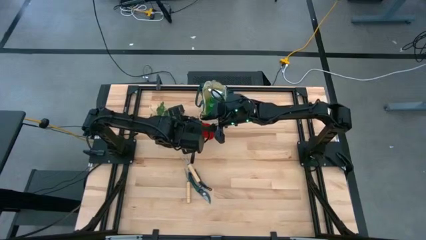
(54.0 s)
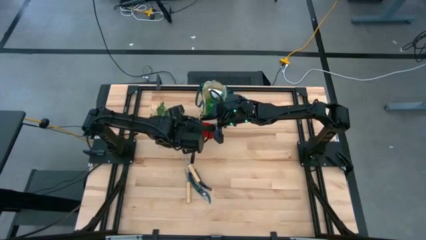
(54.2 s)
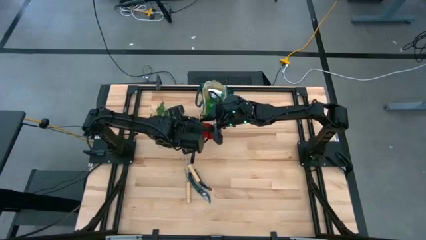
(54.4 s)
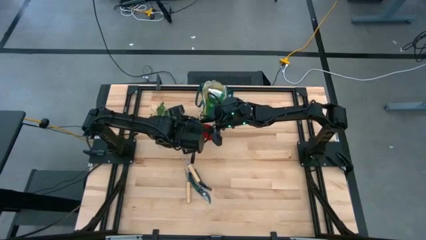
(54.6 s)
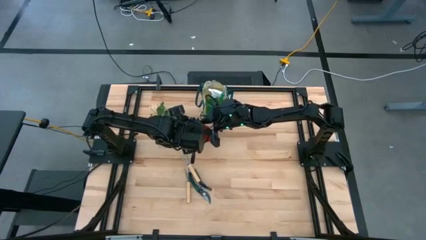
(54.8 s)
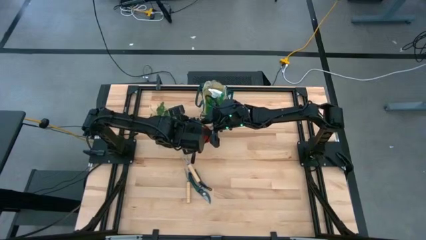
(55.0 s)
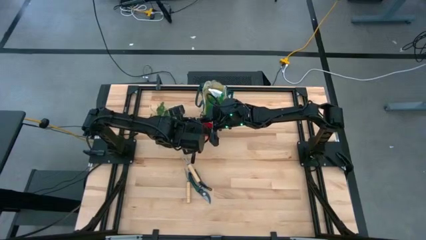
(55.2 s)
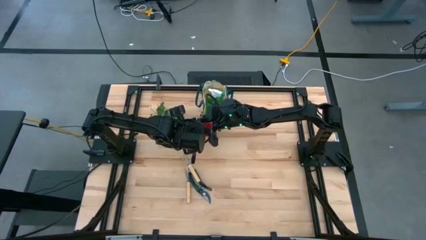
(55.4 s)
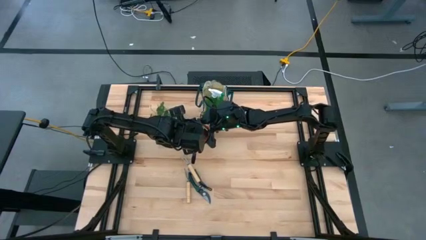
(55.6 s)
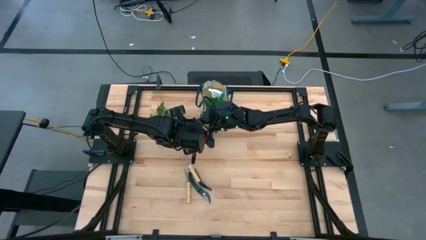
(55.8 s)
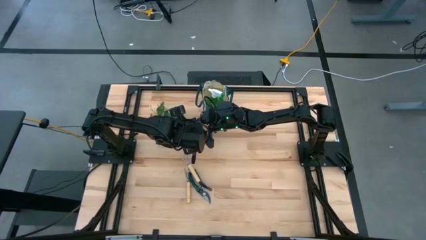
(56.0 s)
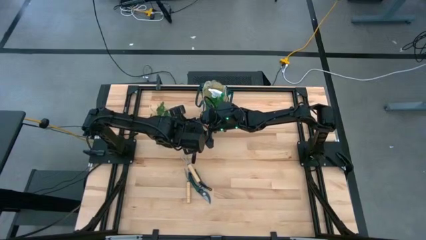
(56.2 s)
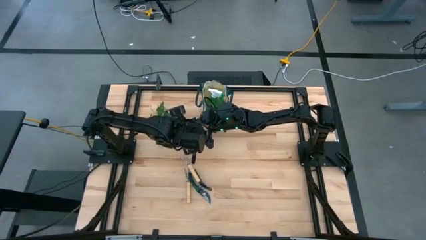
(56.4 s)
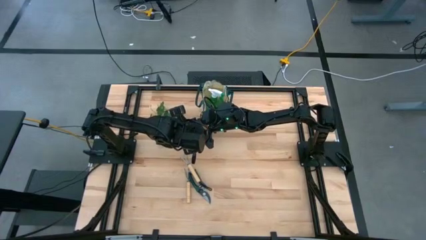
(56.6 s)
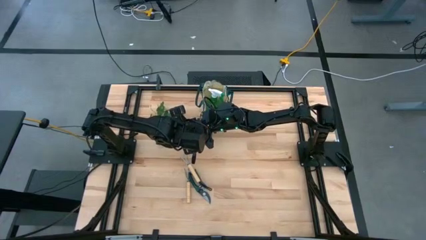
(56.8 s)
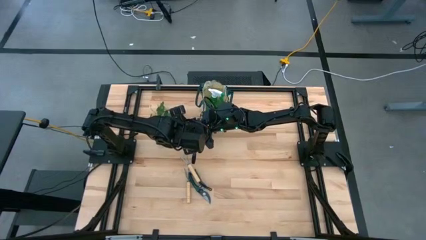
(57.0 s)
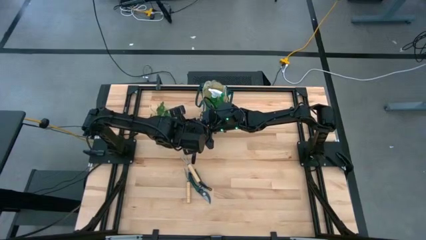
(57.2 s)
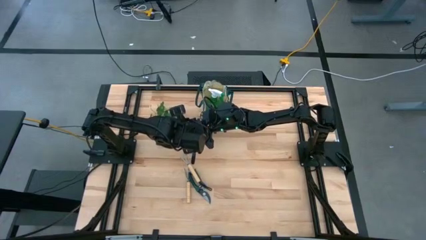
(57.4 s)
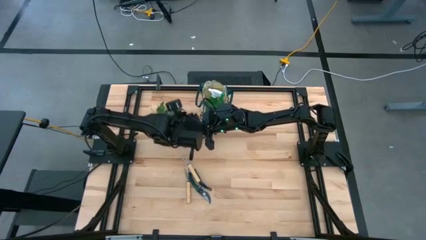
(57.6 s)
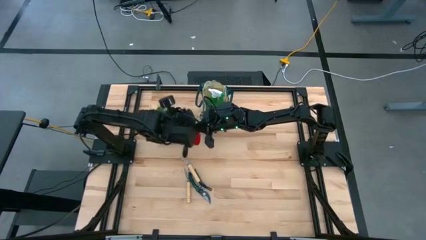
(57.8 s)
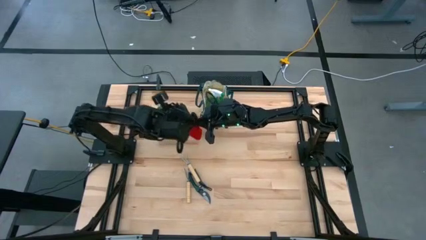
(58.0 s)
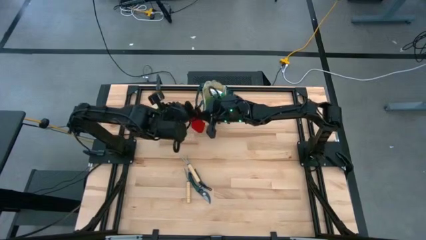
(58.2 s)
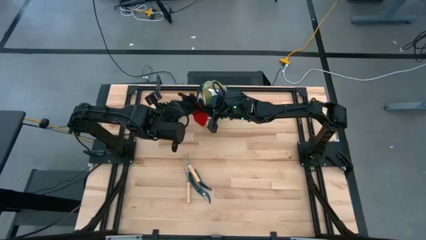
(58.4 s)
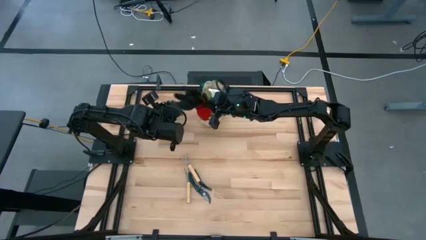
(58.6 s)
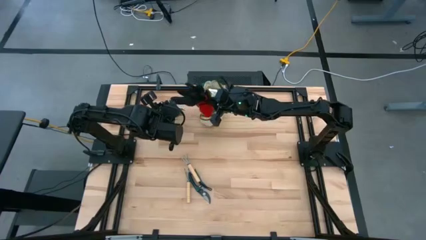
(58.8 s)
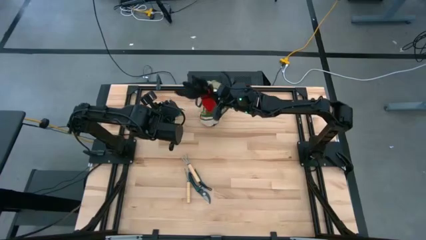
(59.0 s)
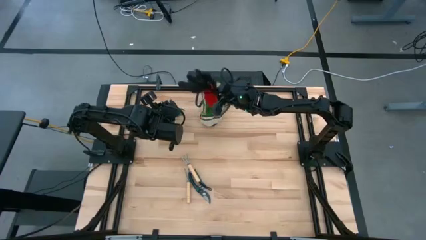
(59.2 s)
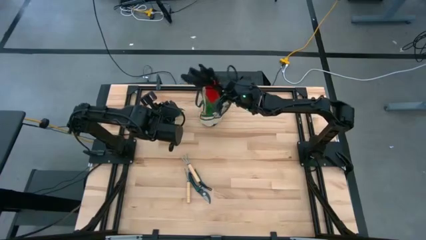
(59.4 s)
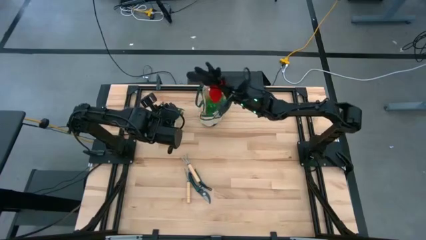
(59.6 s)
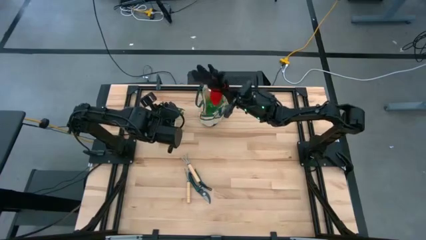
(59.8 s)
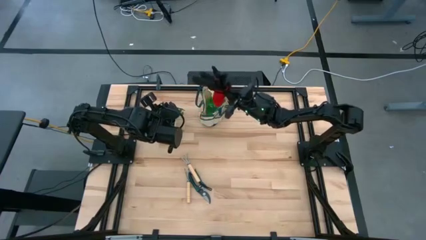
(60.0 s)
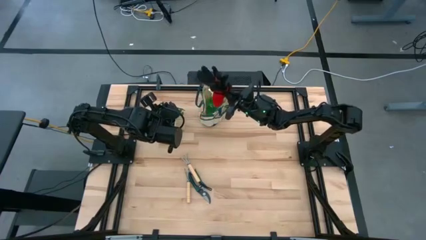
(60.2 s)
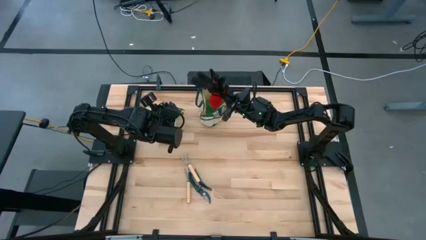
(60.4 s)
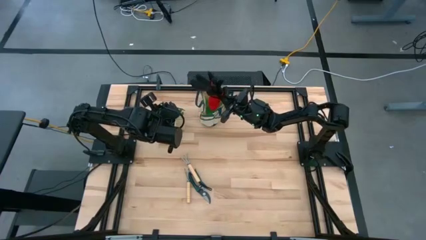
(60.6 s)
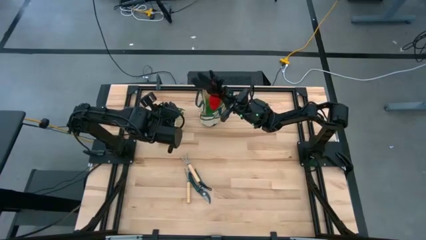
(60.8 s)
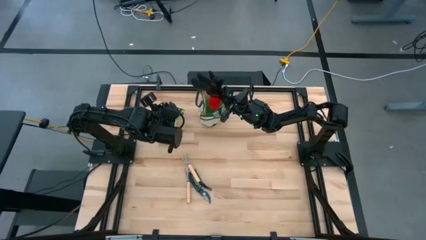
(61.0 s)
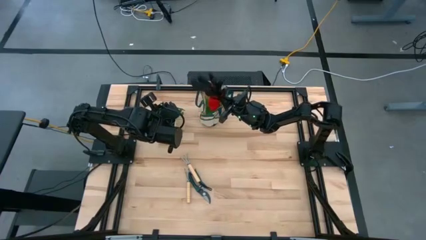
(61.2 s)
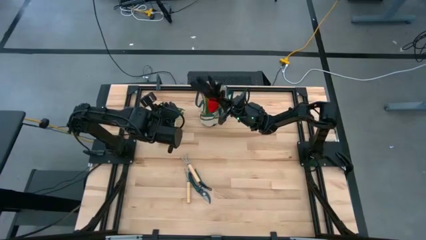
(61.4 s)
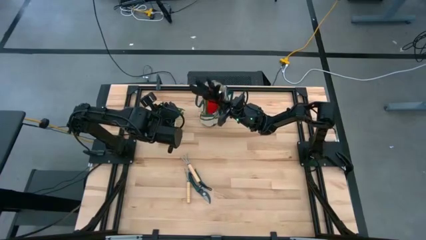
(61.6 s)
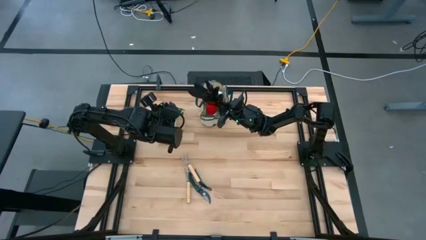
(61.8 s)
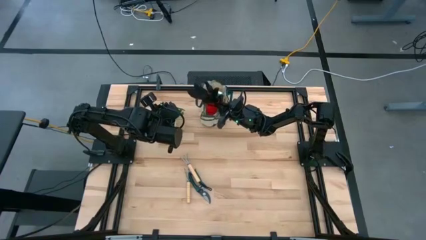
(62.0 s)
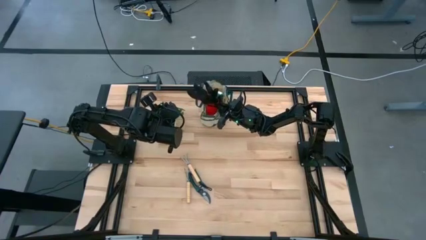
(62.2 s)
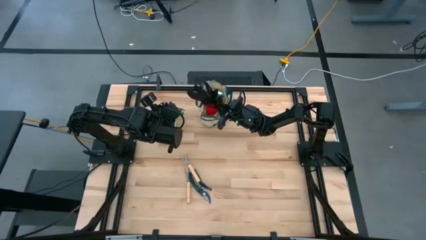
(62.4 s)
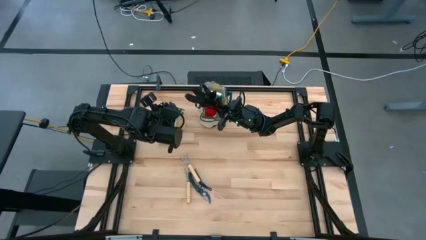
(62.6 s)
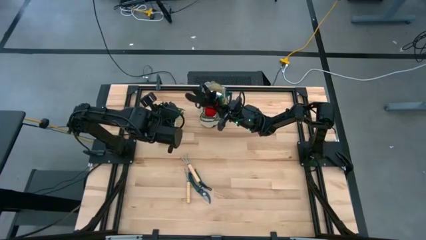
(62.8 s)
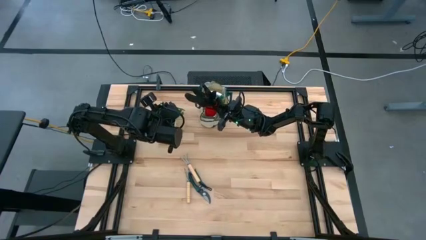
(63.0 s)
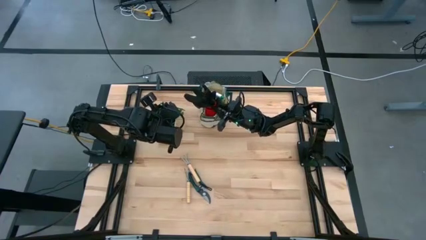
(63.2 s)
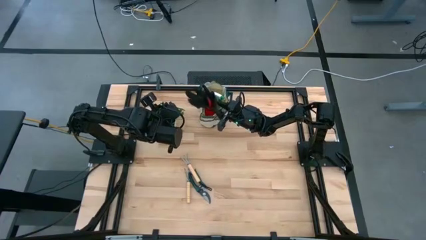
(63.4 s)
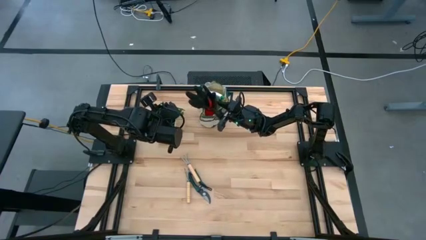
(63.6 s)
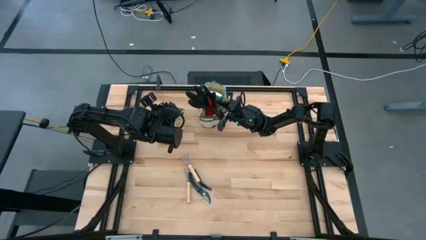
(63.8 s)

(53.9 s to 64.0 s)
Task: Pick & Place Garden tools in Gardening bag
Put the red gloves into the white gardening bag
